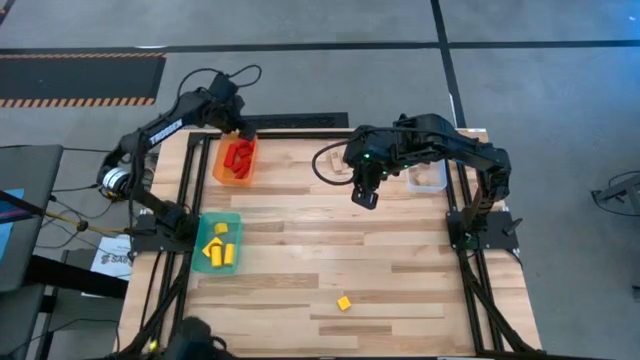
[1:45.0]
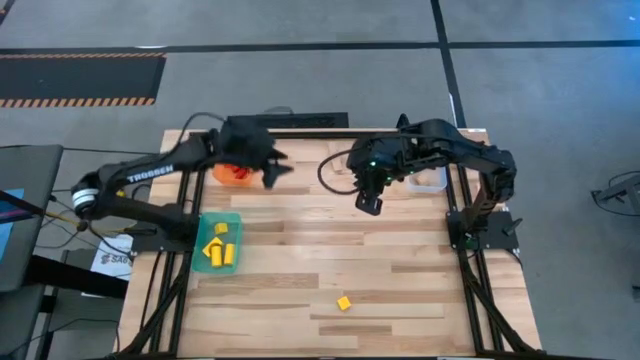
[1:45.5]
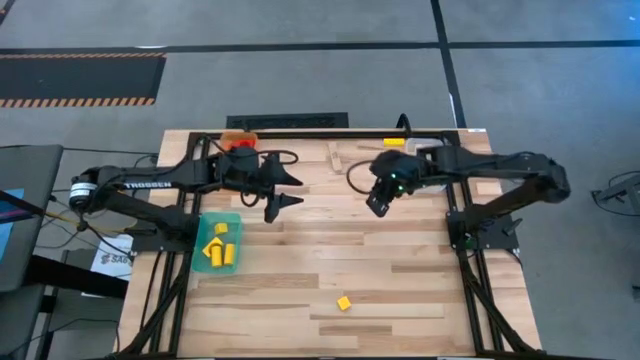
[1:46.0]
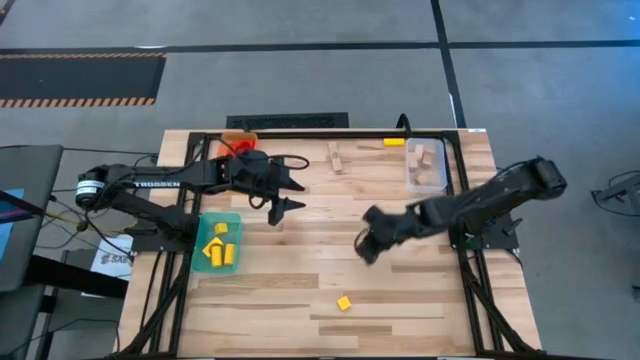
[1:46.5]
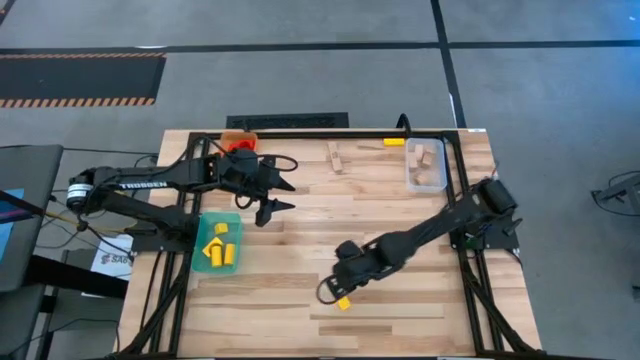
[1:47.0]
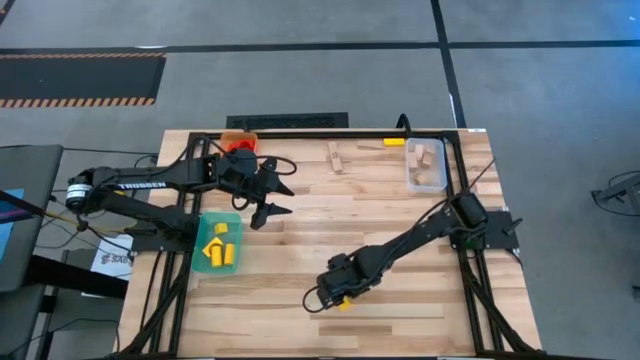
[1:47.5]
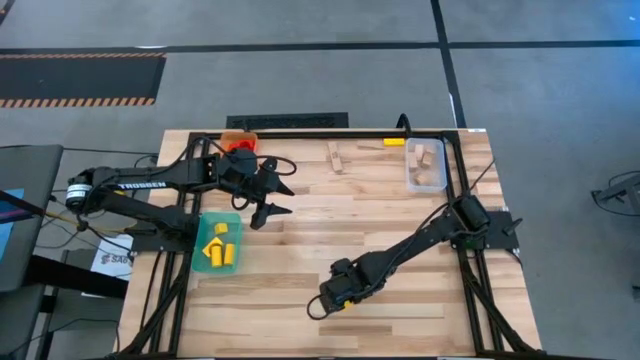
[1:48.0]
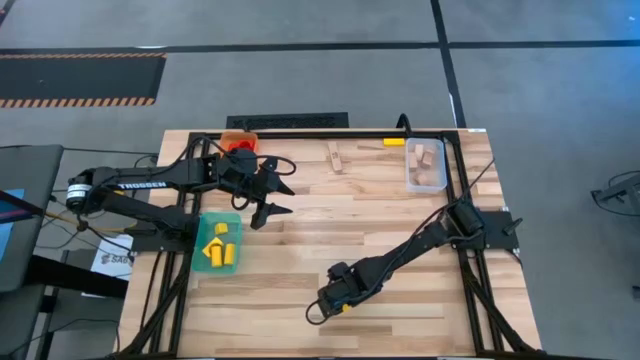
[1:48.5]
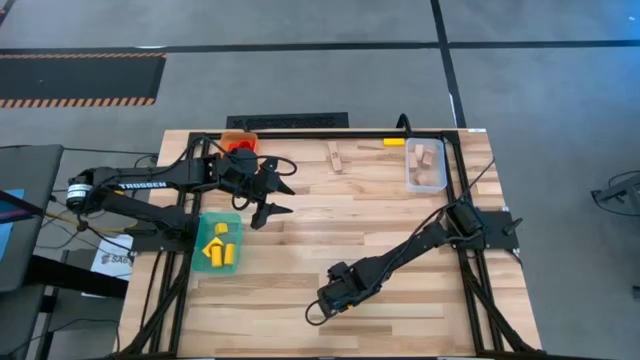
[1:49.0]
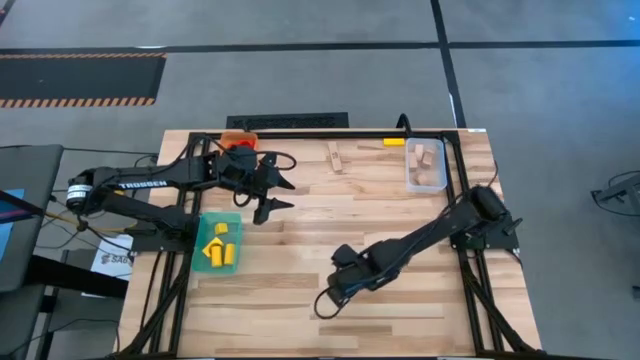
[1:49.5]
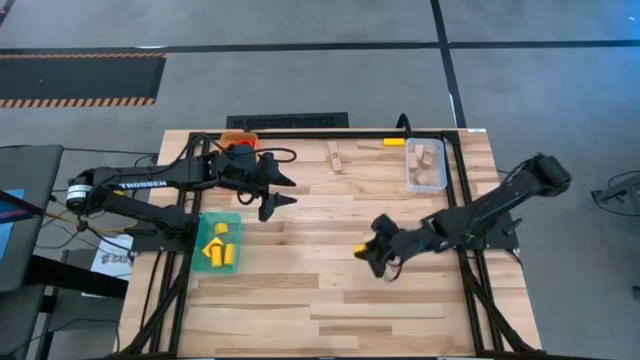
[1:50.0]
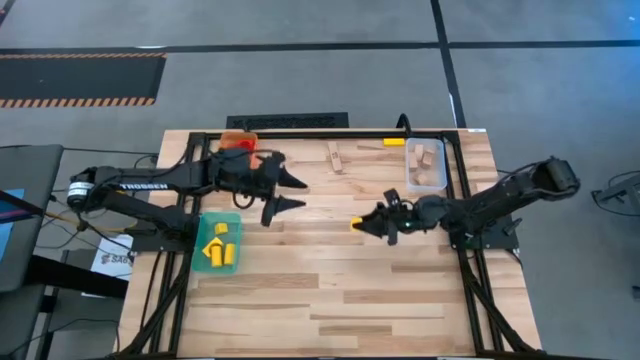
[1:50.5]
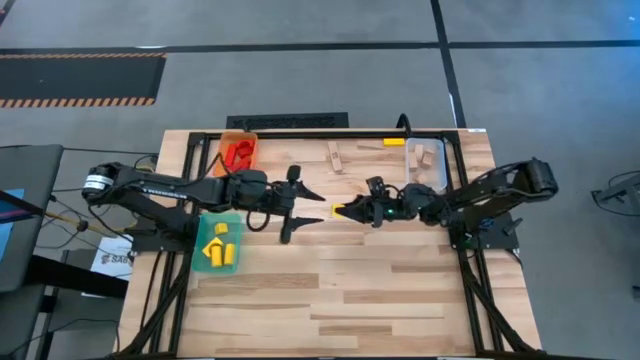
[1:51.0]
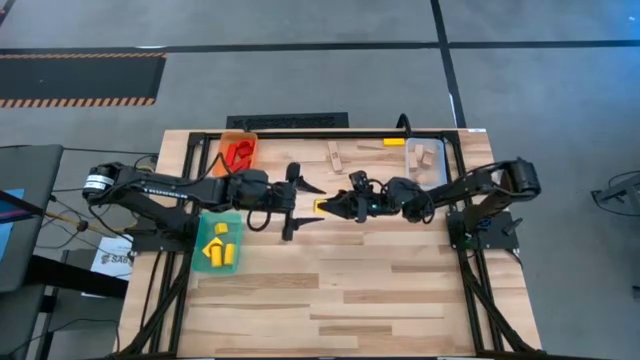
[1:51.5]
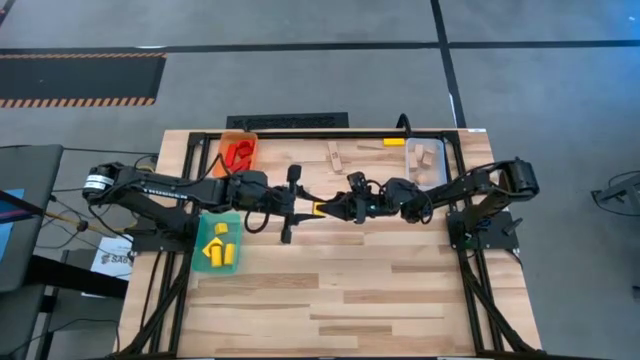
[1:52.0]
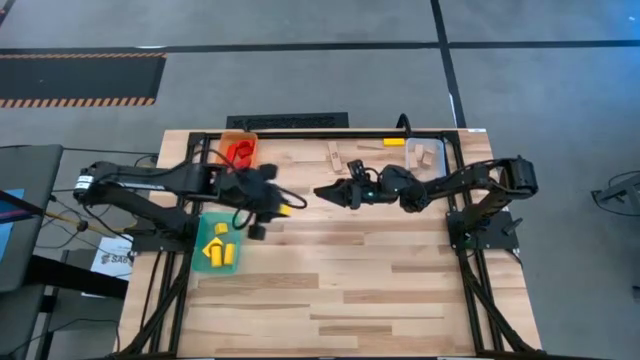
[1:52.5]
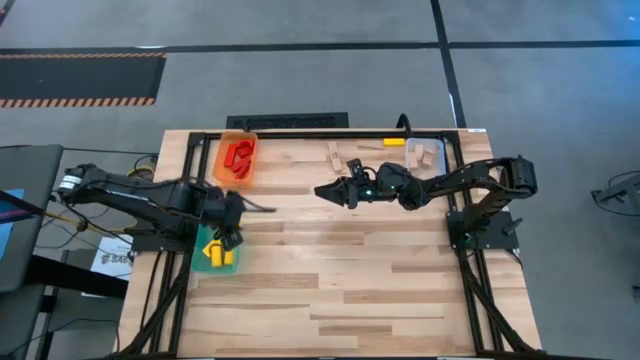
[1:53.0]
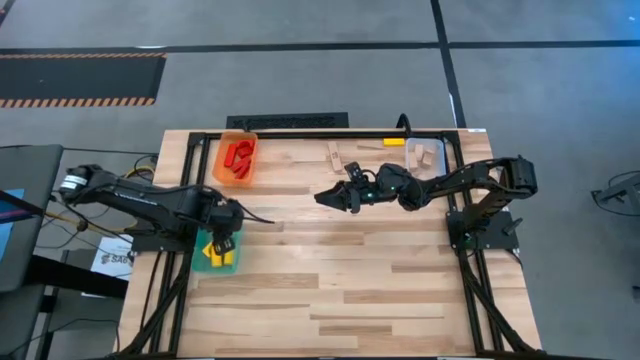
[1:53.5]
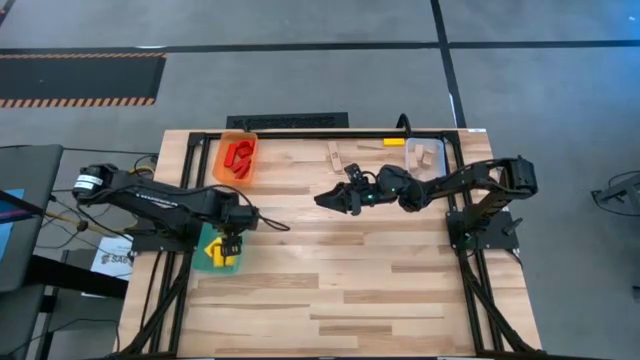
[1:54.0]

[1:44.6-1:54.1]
Task: Sort & place blocks by color
Put the yellow wooden block into the green bin

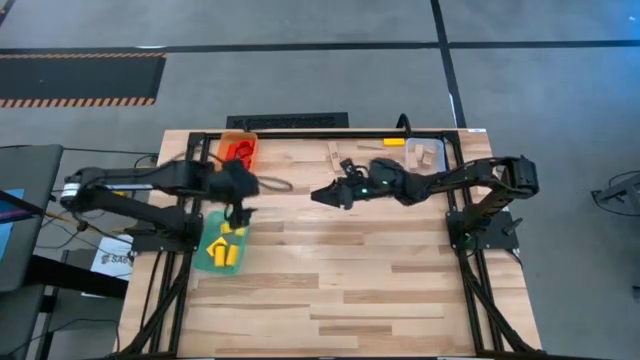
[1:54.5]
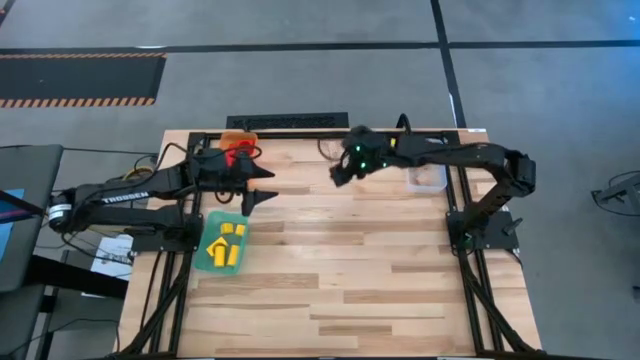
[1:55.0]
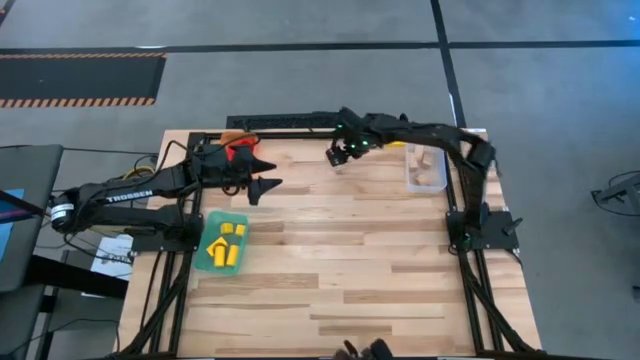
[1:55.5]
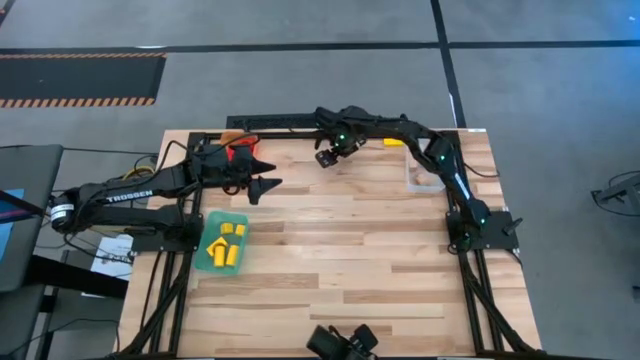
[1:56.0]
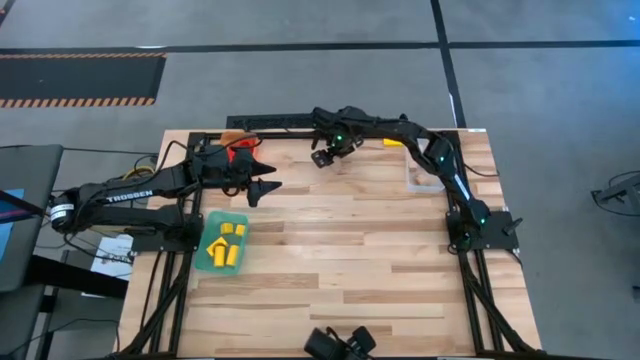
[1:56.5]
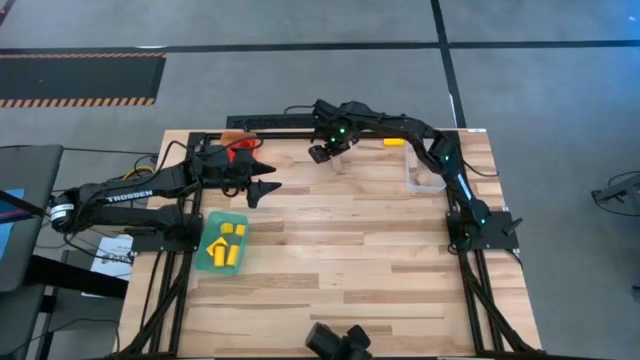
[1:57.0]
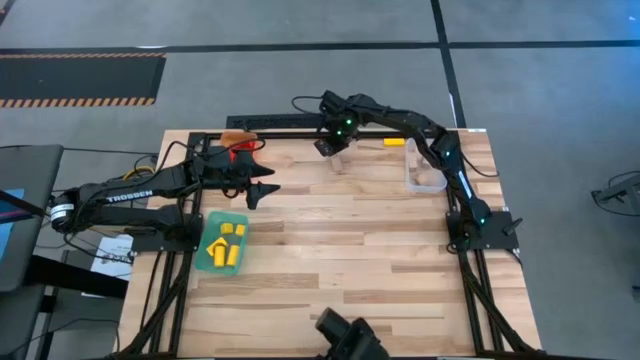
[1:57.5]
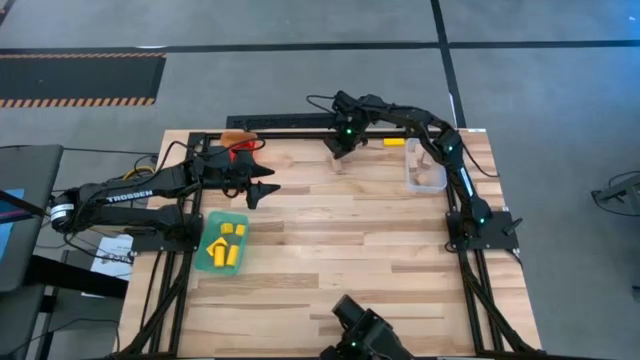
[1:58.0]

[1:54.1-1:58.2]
Put the brown wooden block into the white bin

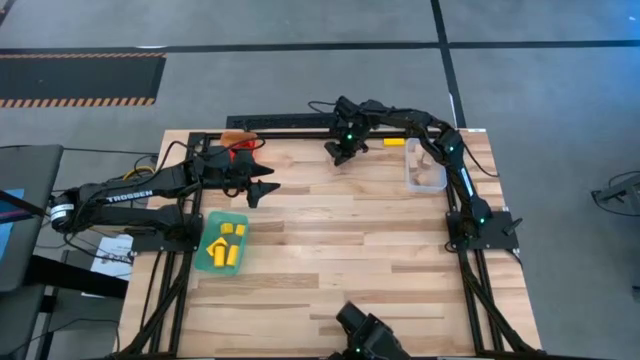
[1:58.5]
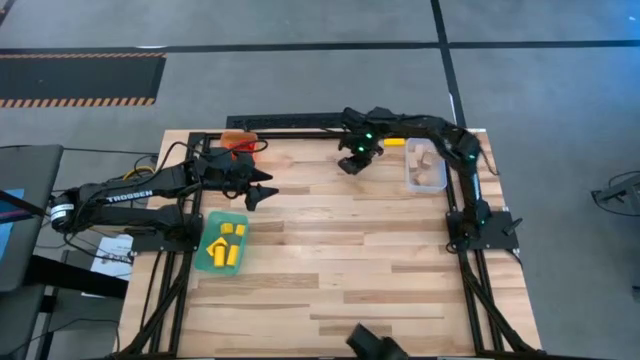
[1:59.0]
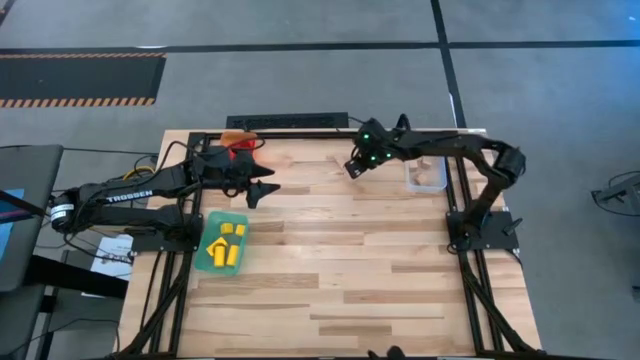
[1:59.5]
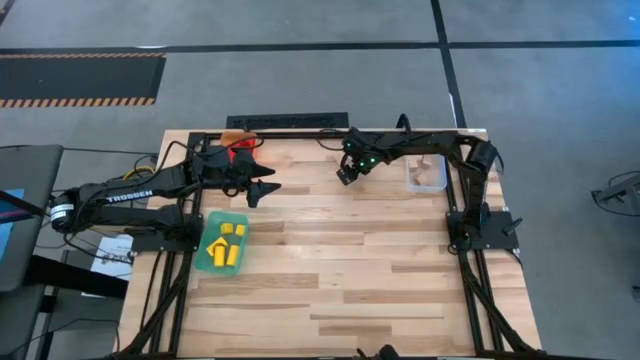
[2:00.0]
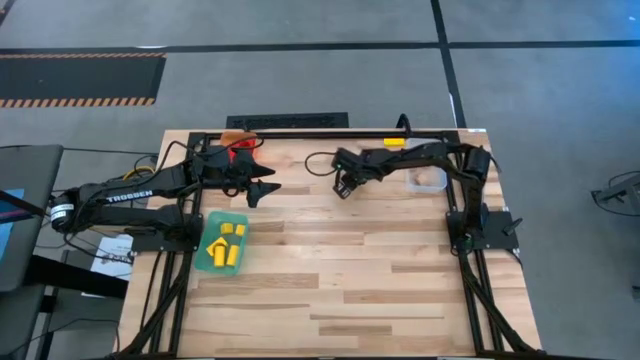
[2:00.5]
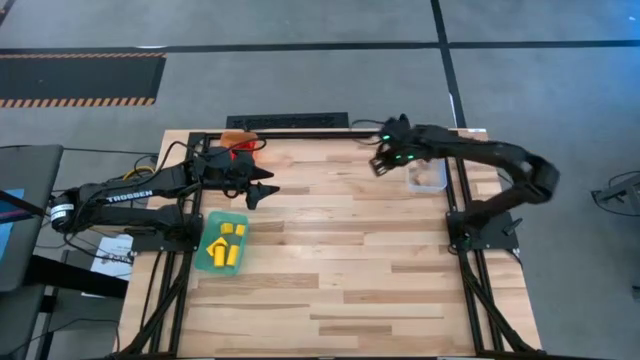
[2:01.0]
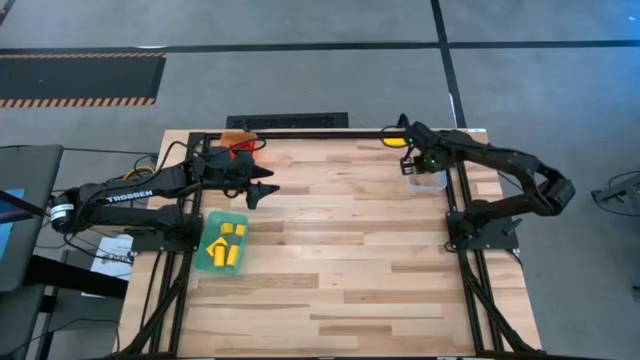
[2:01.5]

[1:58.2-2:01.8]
Put the brown wooden block into the white bin

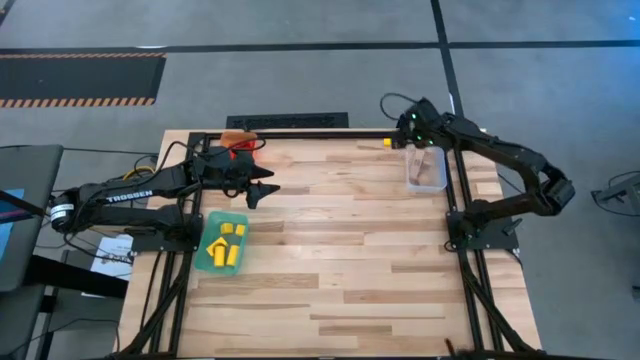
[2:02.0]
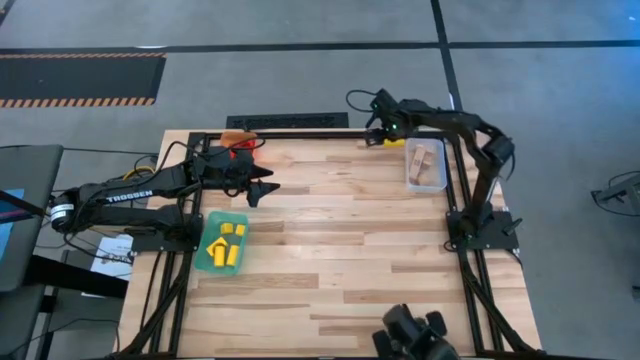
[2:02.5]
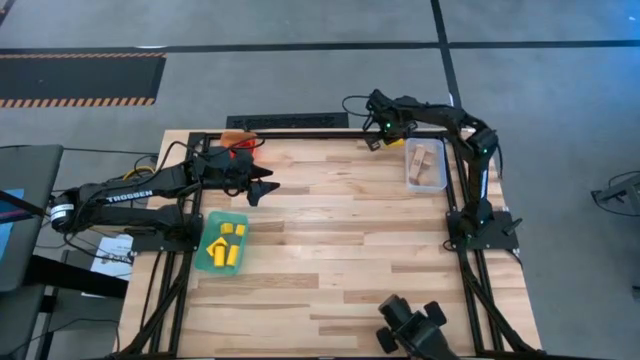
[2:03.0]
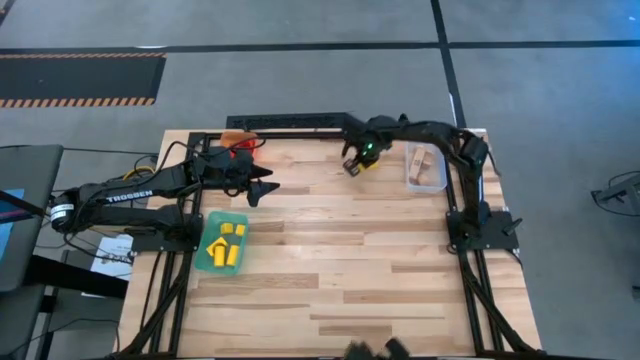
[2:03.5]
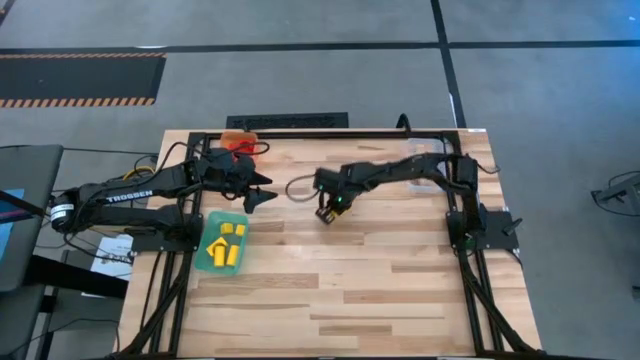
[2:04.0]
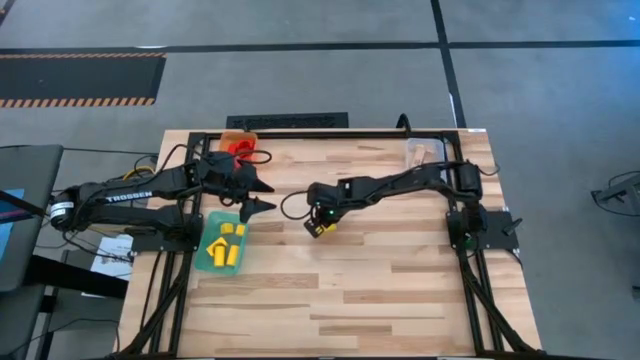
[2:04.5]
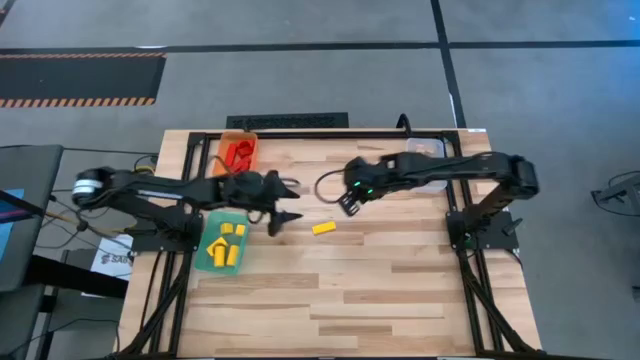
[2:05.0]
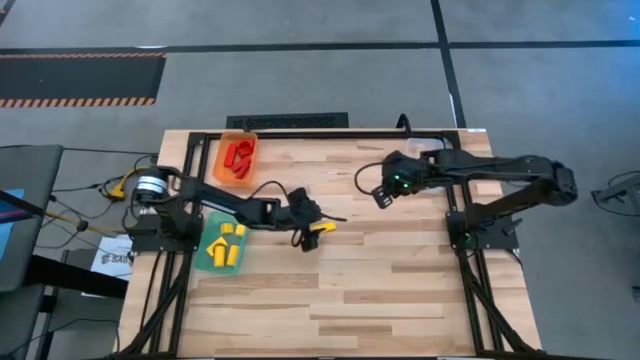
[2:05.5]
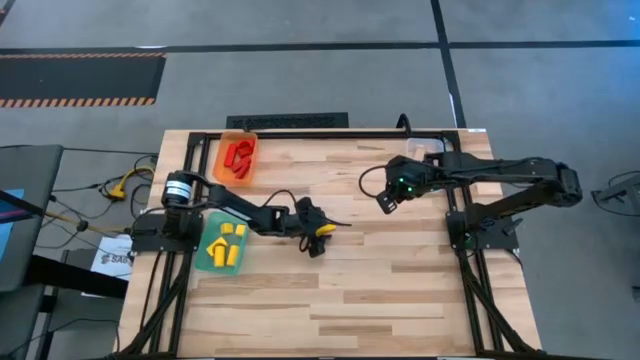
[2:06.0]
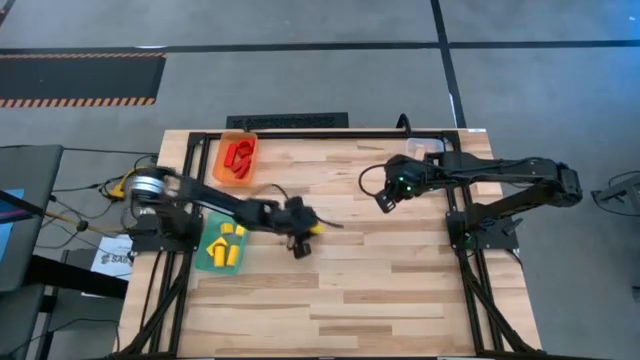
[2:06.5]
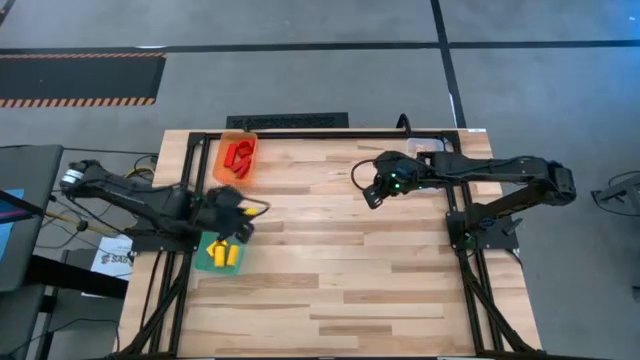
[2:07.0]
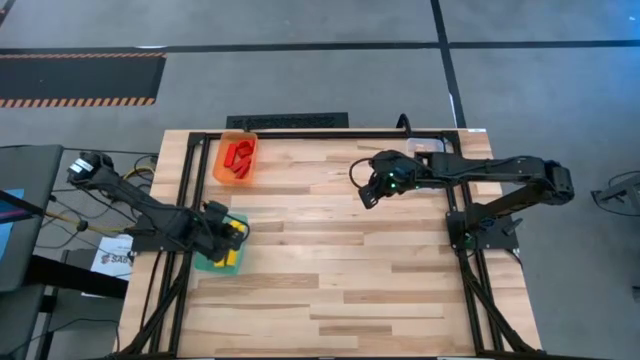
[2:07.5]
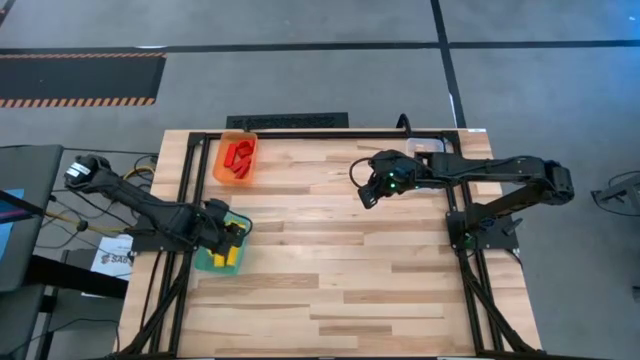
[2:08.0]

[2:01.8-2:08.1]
Put the yellow wooden block into the green bin
